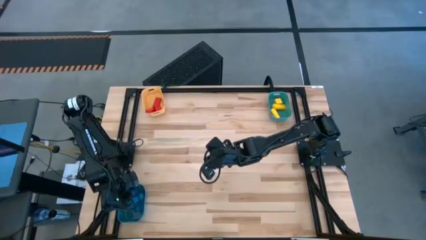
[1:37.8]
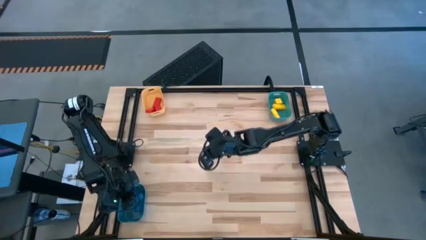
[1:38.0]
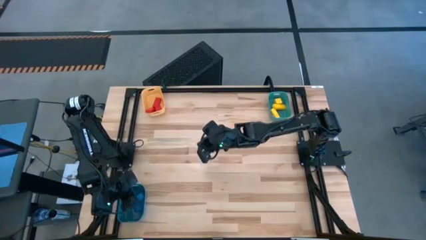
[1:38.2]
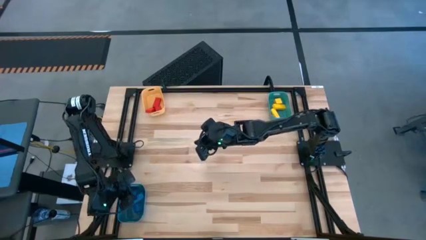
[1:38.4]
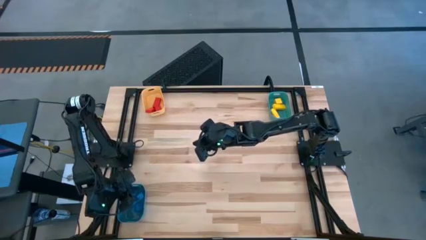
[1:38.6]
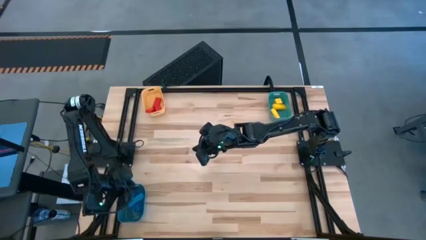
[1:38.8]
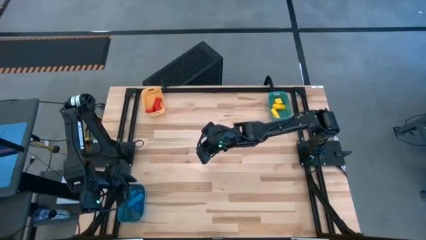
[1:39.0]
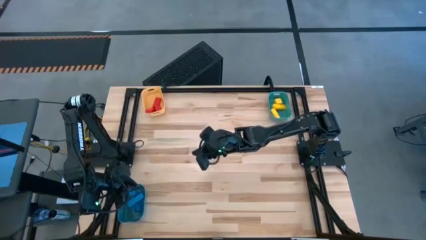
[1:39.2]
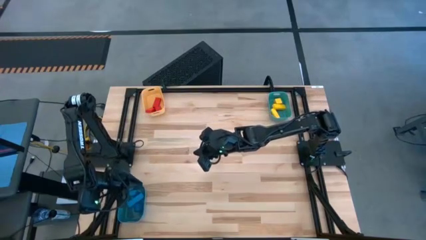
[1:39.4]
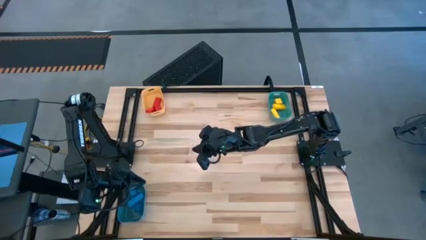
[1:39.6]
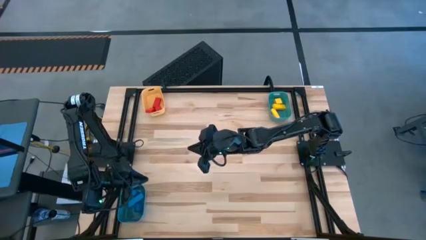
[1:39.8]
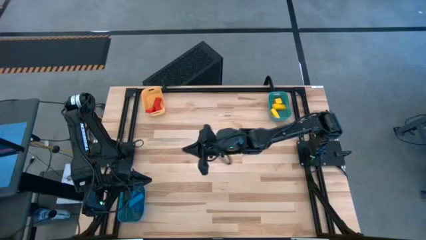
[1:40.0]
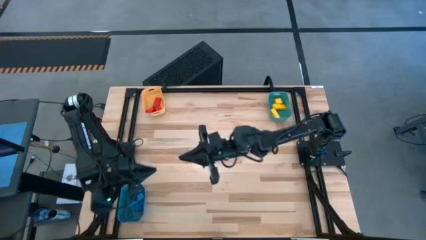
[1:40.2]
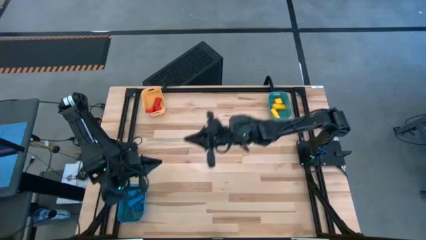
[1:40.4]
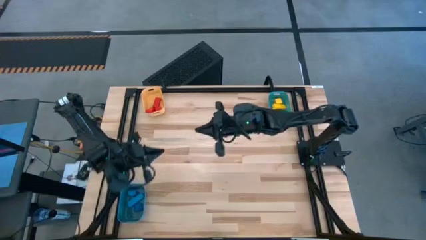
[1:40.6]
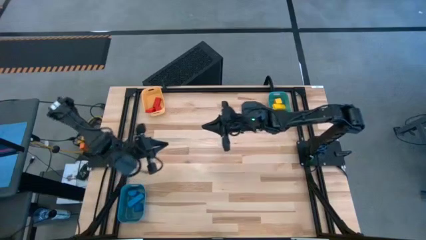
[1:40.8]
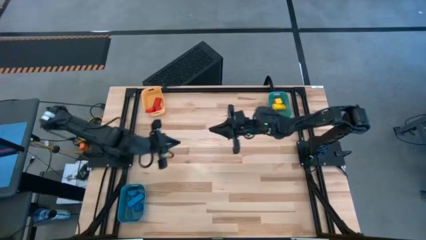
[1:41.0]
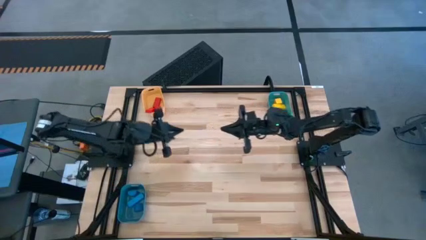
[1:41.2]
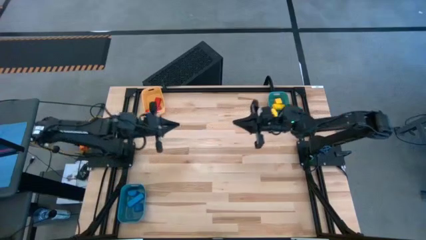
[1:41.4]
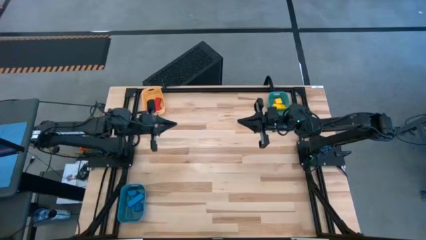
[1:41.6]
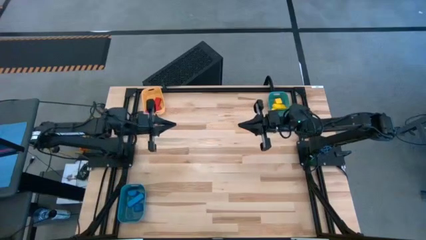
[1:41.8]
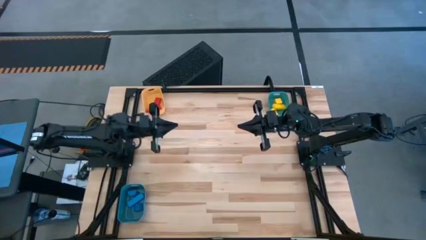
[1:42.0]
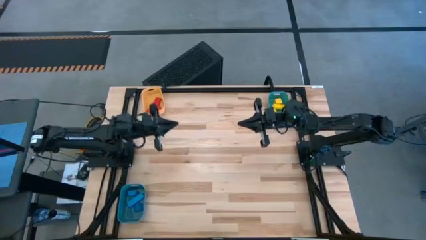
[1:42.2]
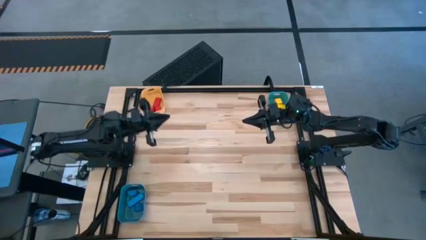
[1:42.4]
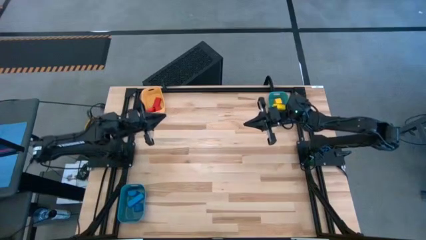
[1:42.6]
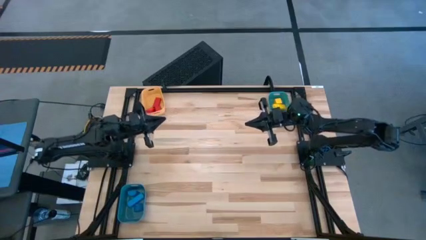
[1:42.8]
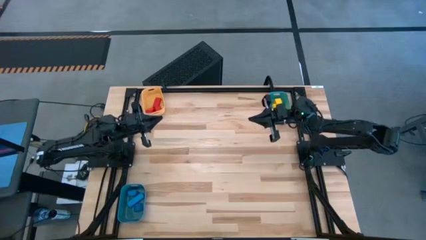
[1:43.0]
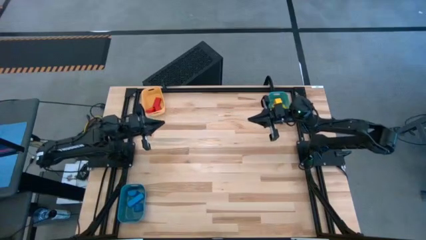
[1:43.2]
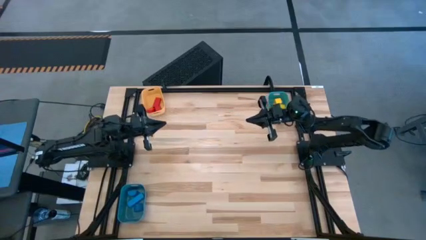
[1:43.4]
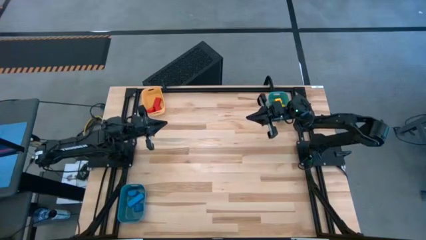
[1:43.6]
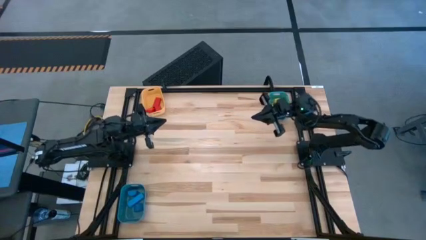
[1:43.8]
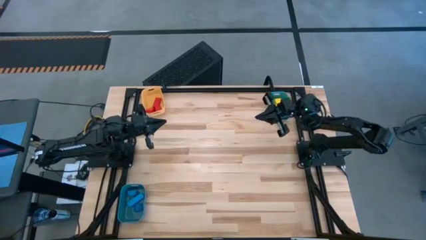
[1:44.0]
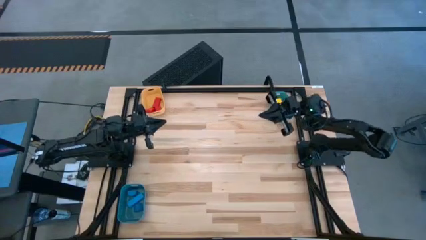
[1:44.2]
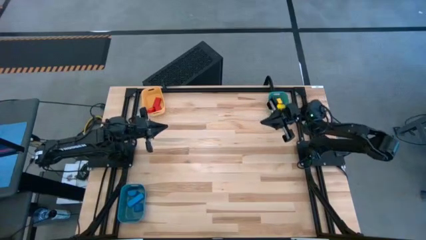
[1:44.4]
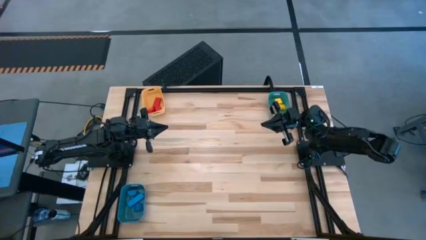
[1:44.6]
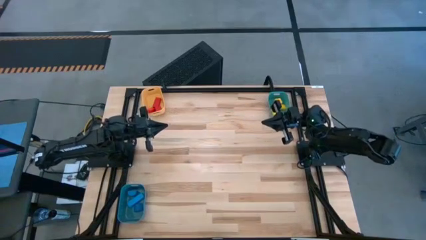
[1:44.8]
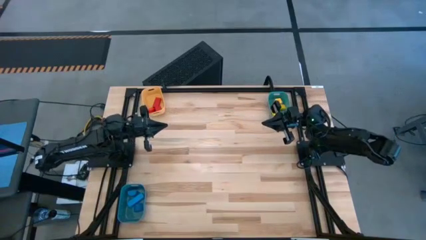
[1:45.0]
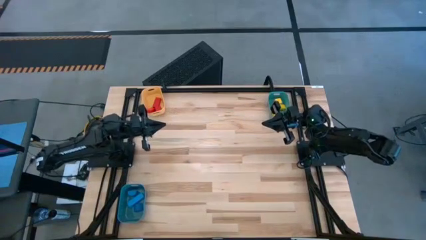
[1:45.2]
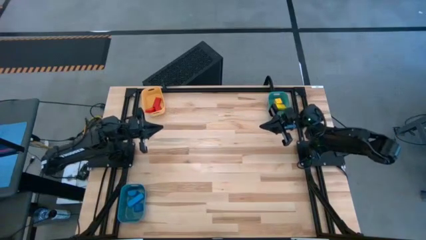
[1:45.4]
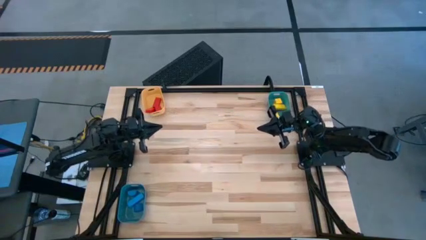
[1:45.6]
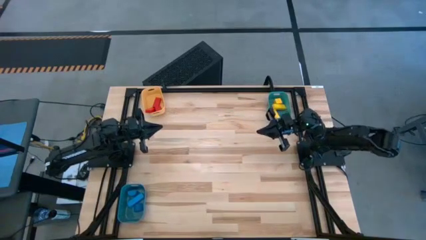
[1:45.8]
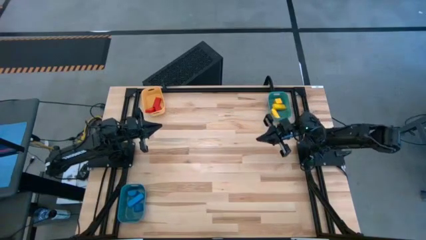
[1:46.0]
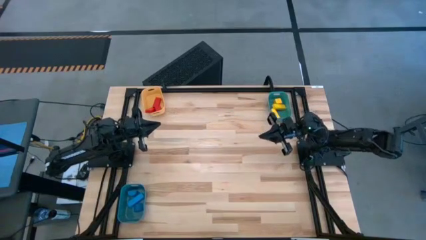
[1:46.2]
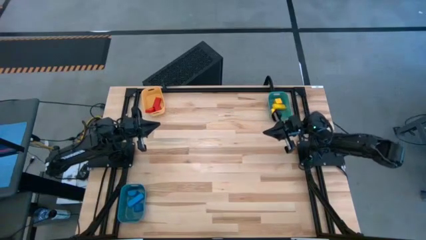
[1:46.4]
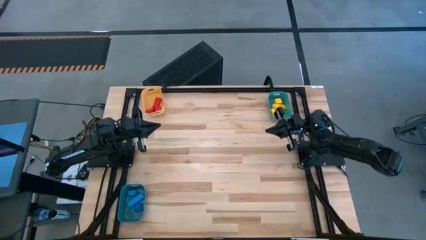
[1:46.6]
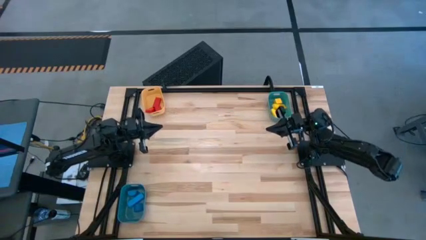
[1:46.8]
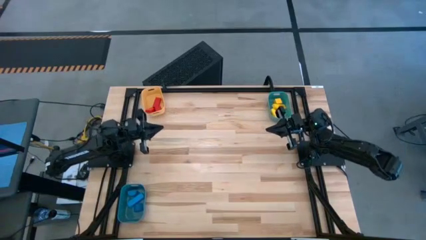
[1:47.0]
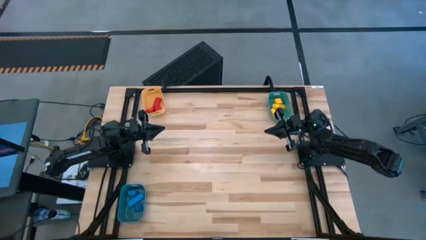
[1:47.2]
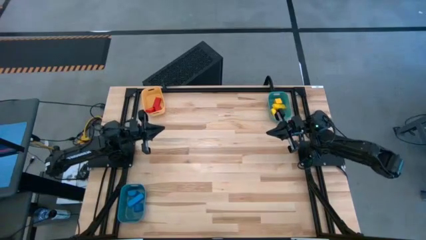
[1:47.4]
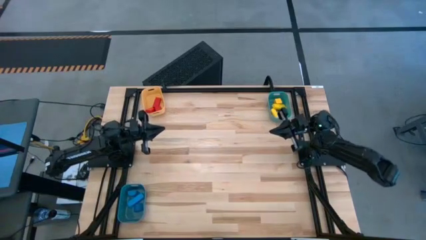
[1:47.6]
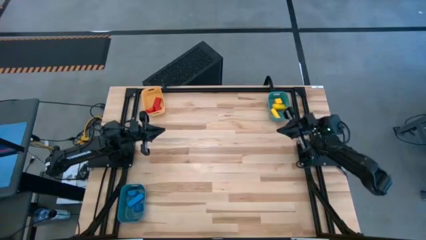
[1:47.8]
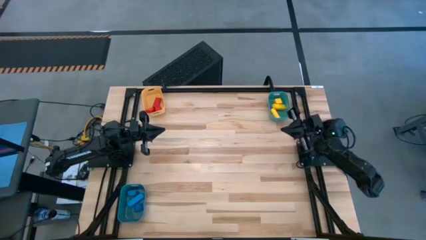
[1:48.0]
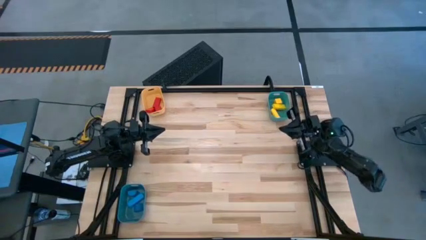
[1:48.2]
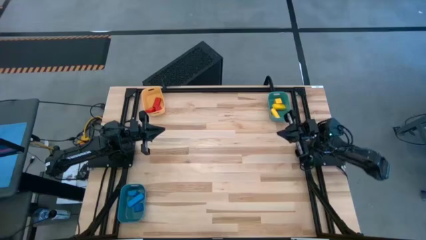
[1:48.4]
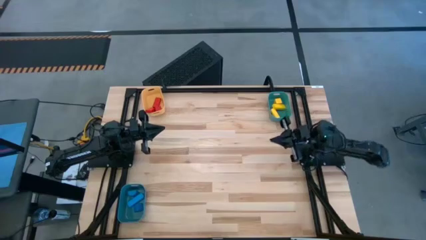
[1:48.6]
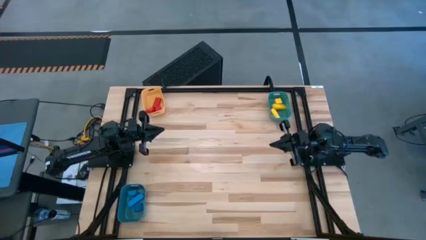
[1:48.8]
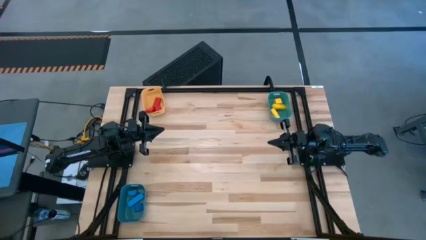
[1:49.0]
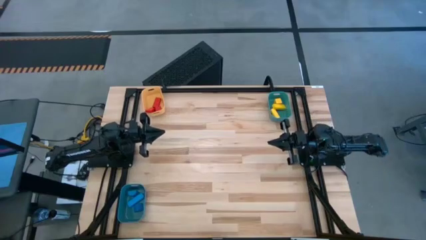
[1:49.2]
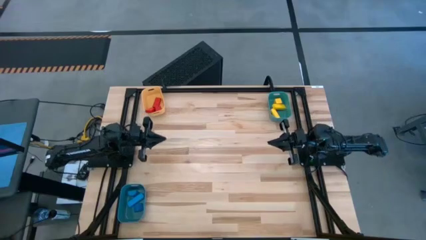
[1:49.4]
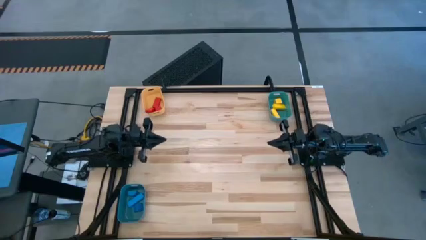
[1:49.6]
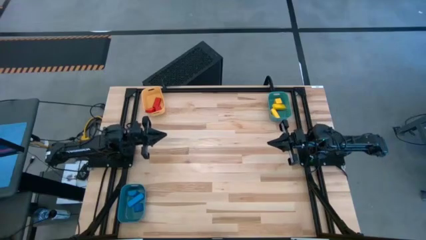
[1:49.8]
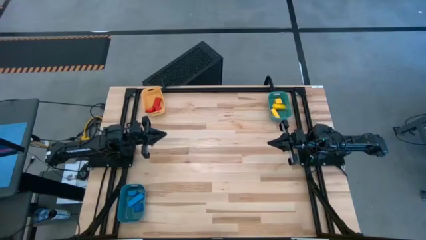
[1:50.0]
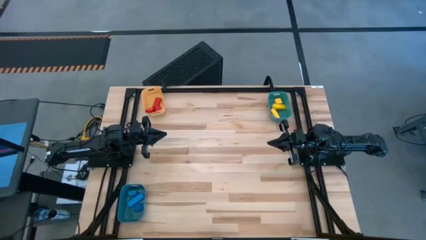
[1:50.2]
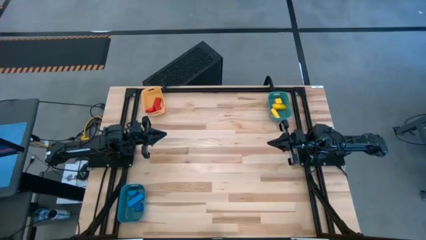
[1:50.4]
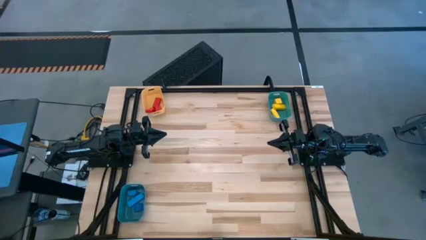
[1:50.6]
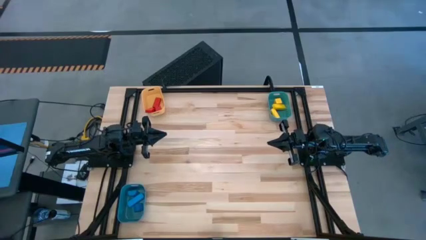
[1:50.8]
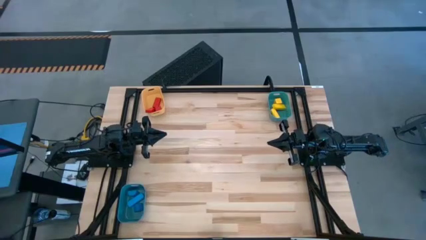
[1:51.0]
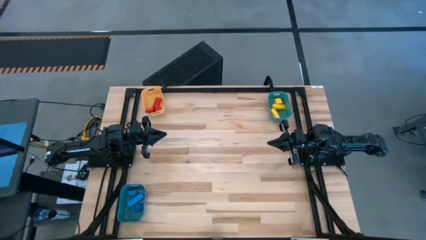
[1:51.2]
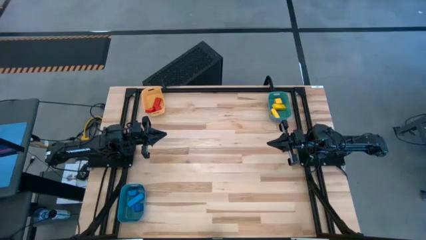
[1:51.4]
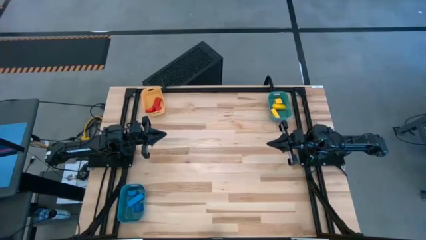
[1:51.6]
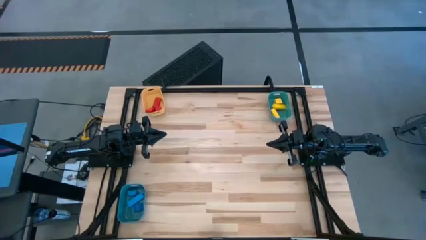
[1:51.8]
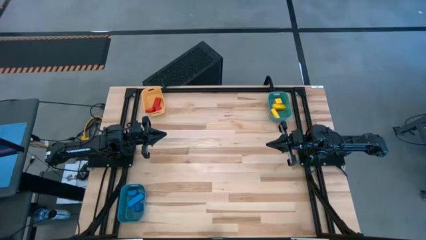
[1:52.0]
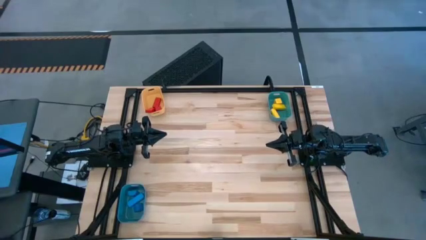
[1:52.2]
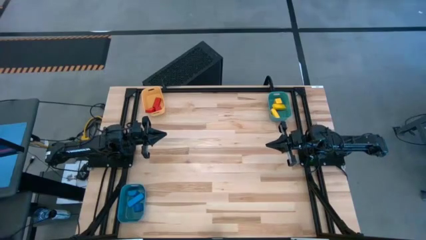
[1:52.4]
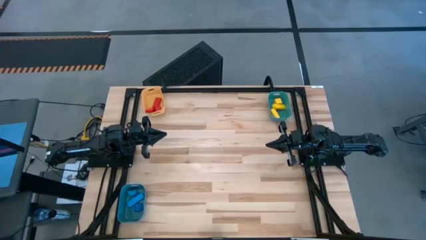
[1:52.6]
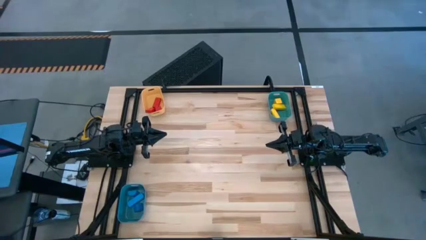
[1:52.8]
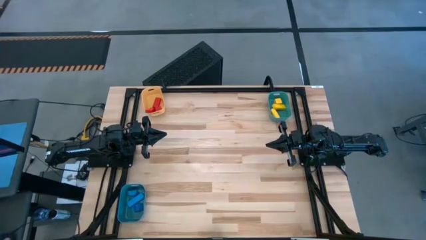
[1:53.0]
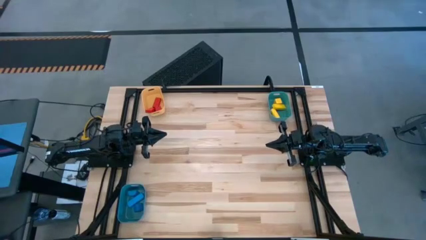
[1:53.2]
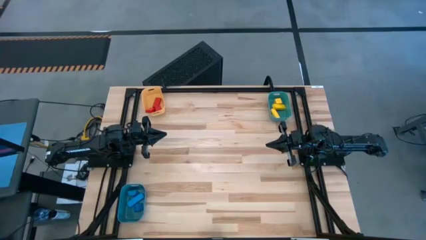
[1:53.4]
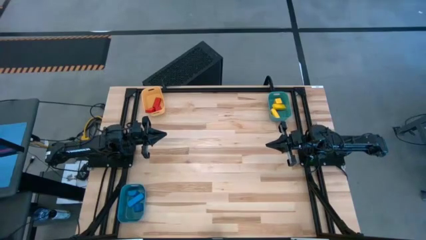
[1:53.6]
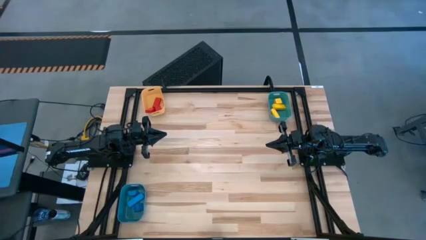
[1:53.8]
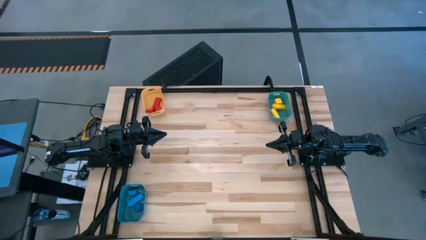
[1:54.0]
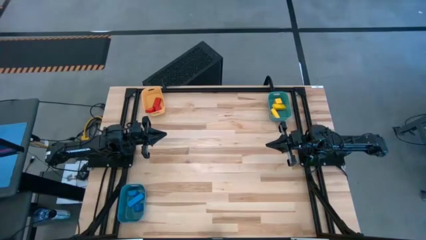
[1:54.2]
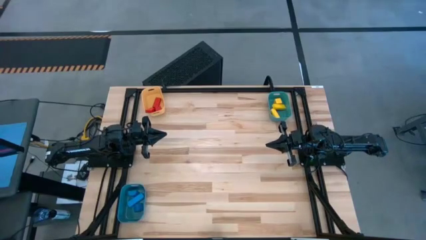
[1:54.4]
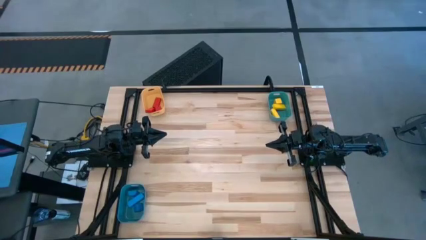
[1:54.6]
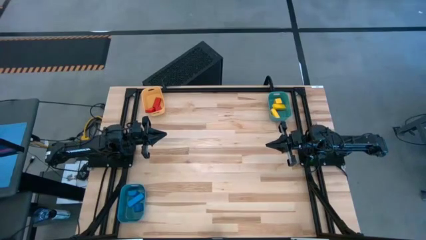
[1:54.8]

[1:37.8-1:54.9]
Task: Sort & place blocks by color
Return to Home Position
